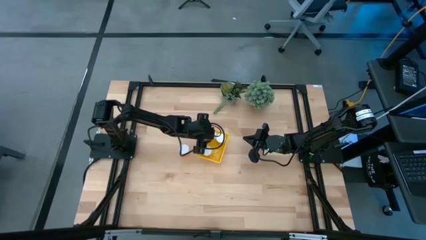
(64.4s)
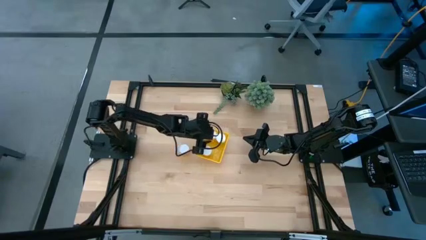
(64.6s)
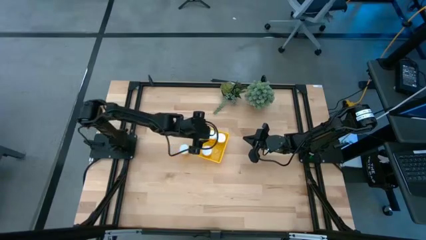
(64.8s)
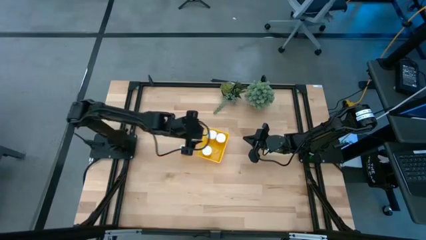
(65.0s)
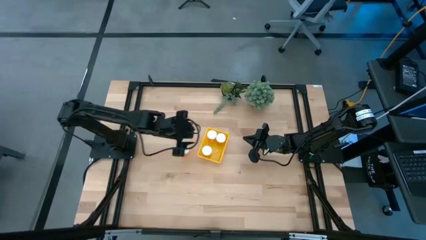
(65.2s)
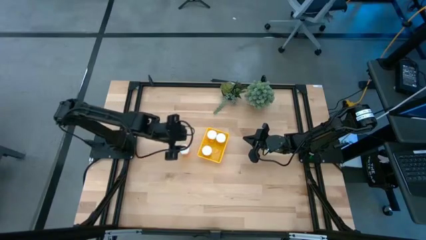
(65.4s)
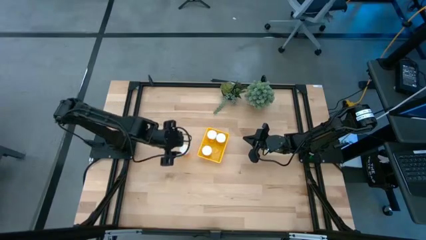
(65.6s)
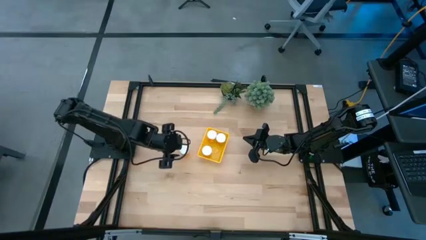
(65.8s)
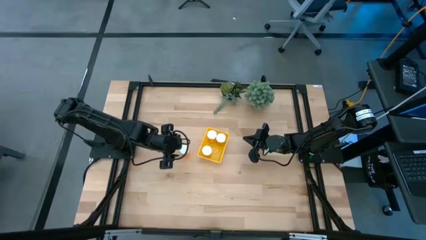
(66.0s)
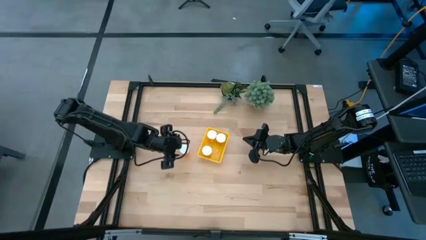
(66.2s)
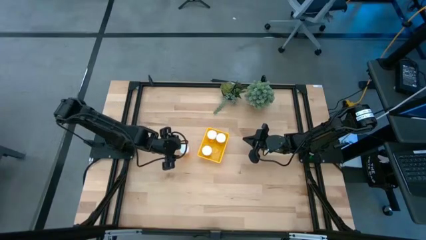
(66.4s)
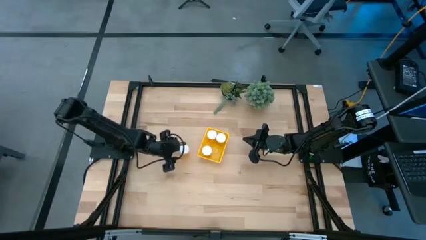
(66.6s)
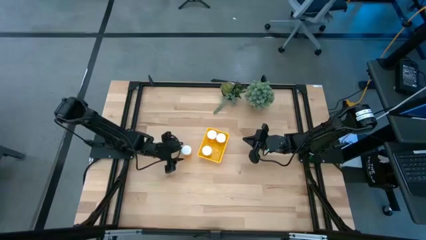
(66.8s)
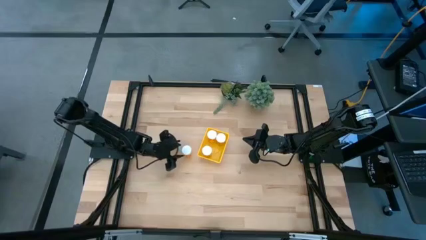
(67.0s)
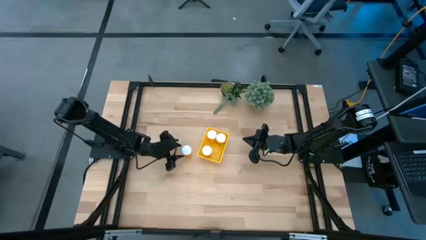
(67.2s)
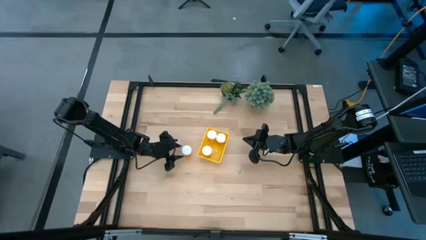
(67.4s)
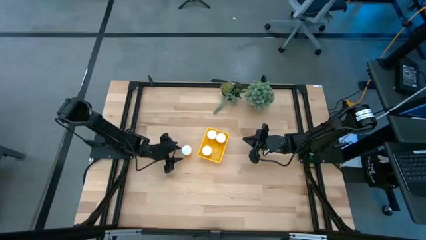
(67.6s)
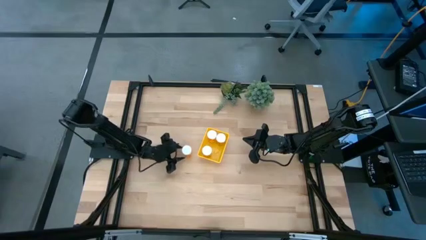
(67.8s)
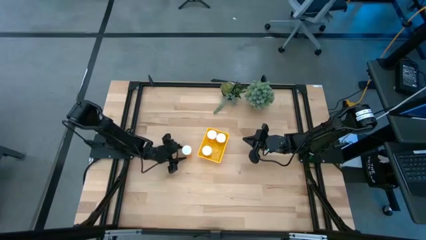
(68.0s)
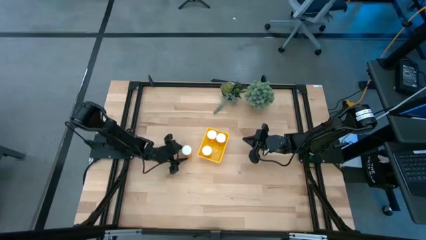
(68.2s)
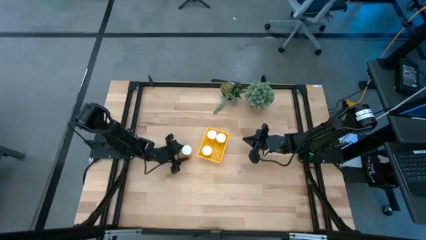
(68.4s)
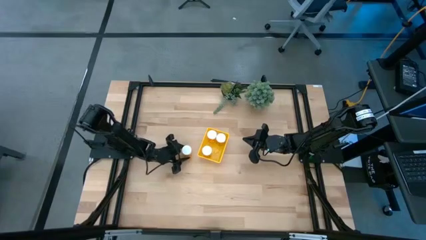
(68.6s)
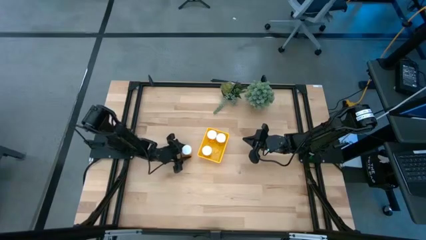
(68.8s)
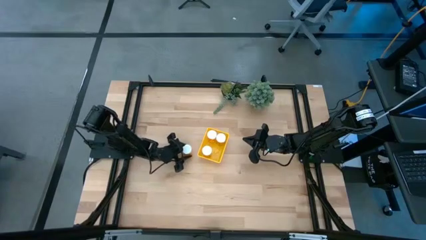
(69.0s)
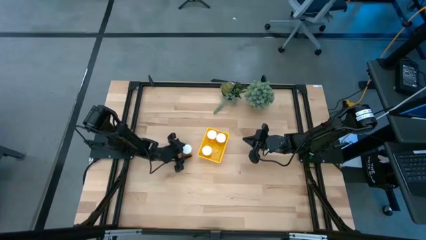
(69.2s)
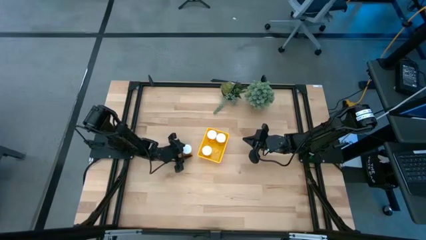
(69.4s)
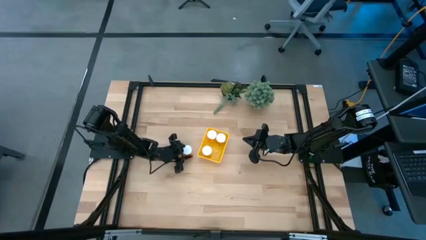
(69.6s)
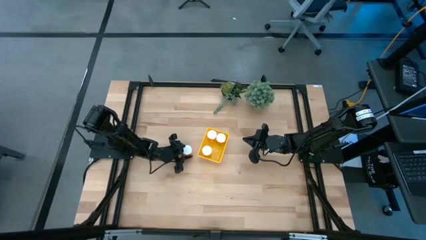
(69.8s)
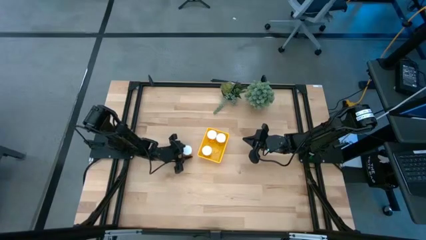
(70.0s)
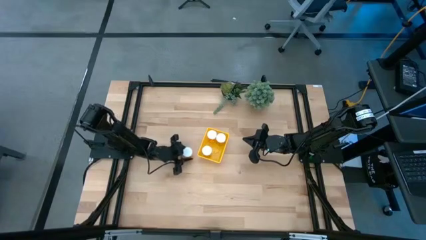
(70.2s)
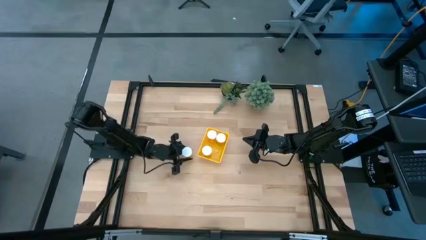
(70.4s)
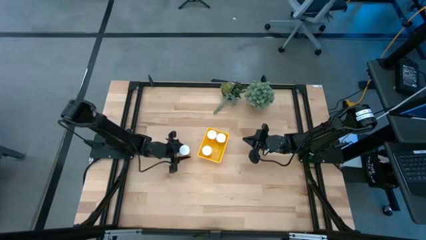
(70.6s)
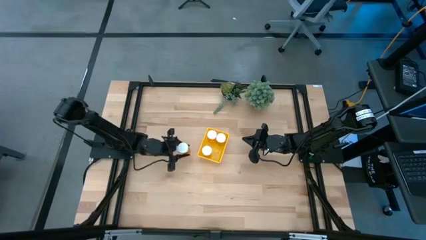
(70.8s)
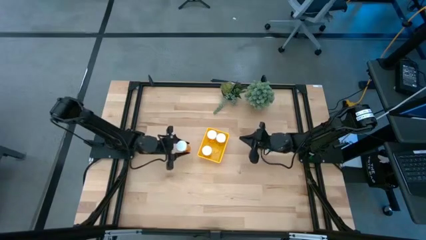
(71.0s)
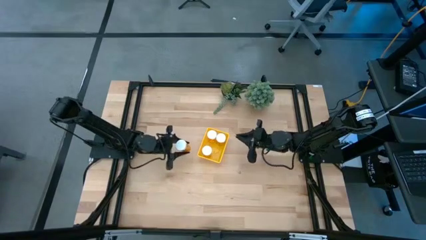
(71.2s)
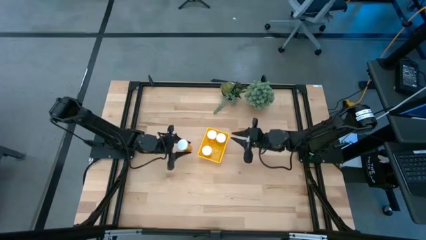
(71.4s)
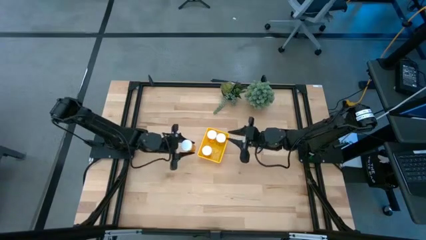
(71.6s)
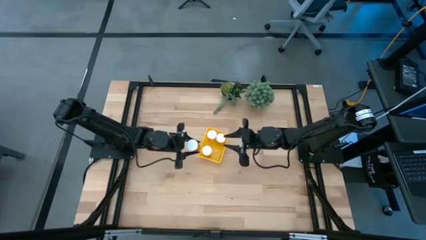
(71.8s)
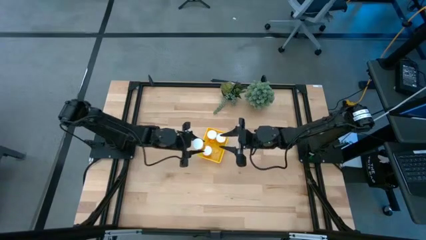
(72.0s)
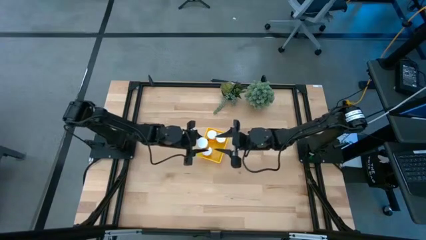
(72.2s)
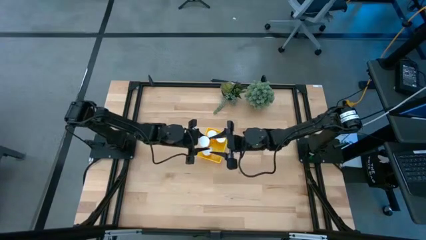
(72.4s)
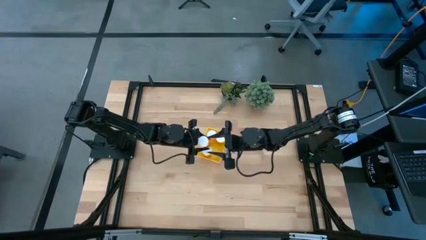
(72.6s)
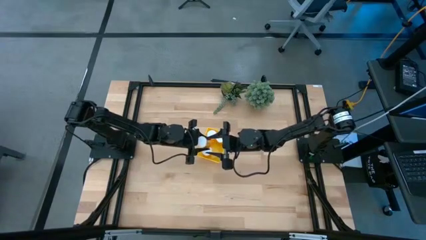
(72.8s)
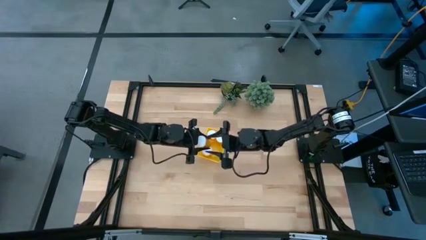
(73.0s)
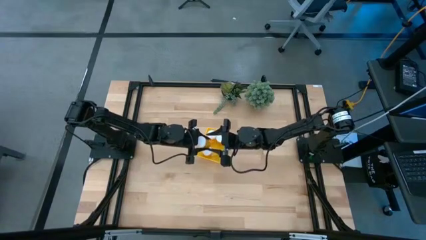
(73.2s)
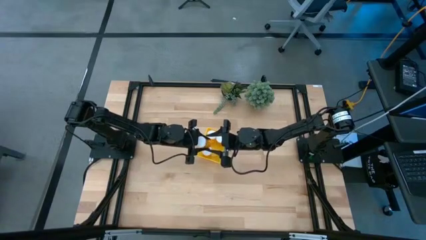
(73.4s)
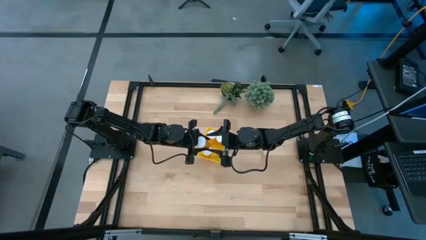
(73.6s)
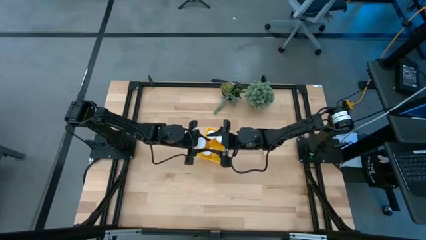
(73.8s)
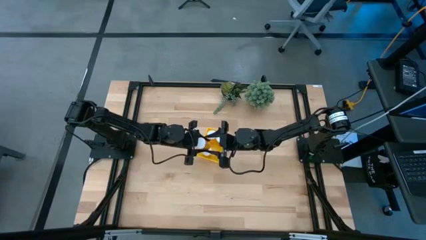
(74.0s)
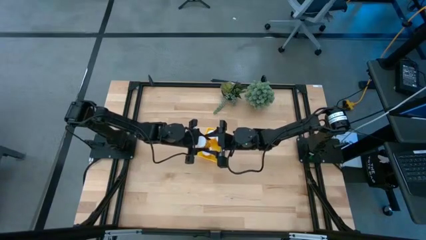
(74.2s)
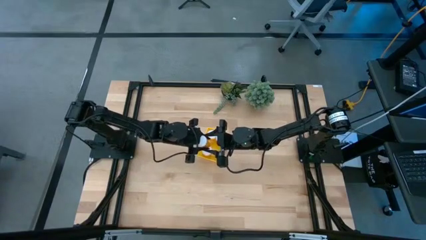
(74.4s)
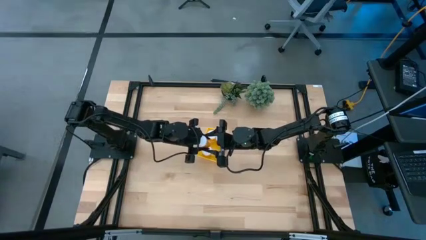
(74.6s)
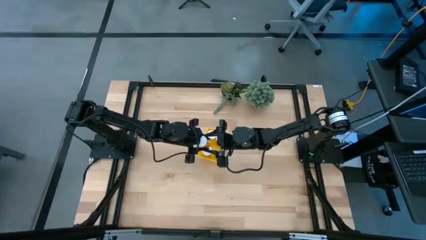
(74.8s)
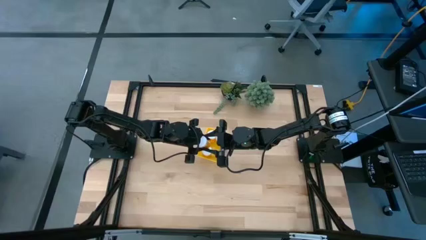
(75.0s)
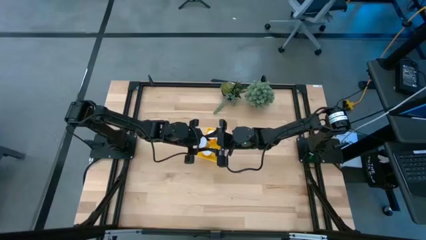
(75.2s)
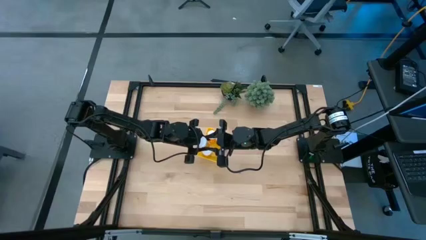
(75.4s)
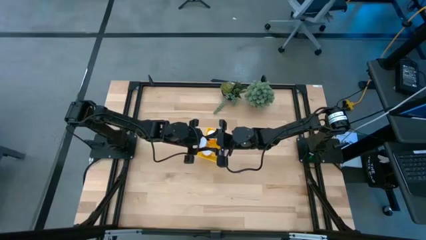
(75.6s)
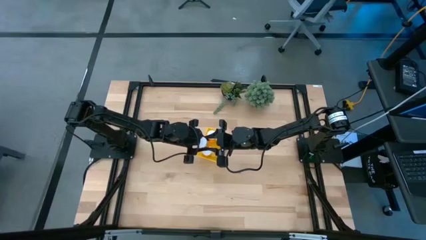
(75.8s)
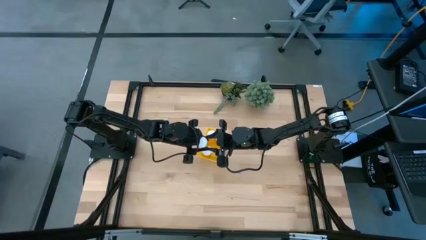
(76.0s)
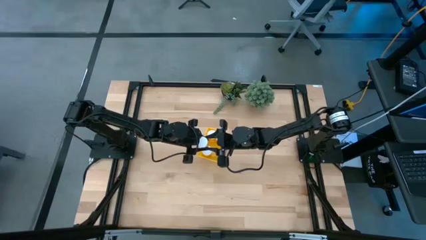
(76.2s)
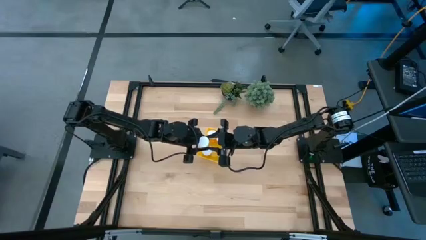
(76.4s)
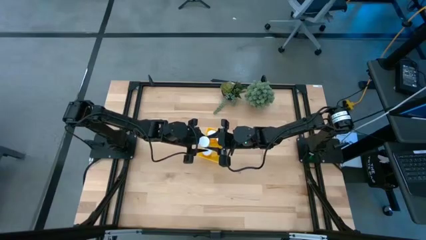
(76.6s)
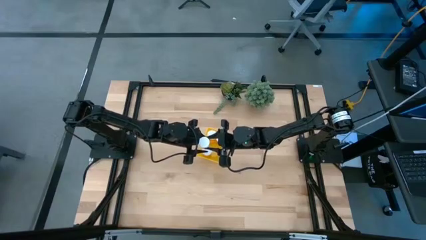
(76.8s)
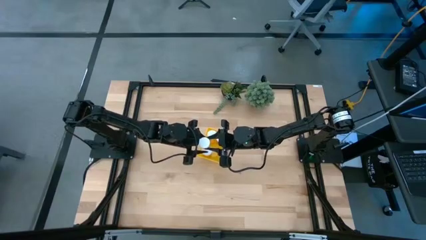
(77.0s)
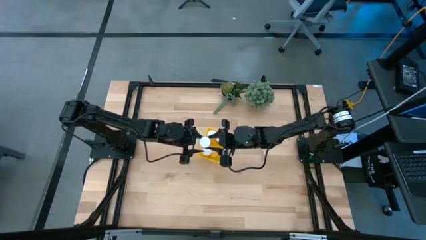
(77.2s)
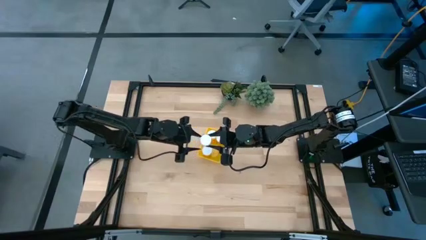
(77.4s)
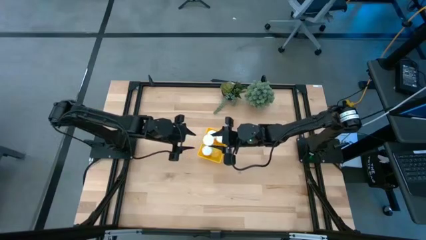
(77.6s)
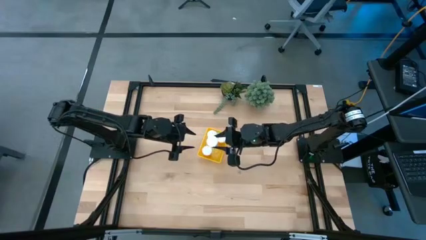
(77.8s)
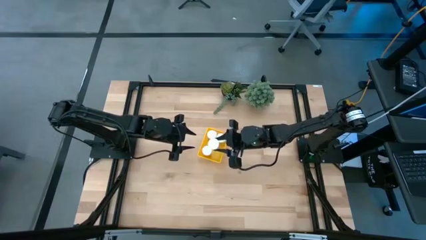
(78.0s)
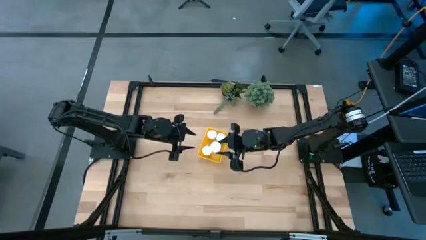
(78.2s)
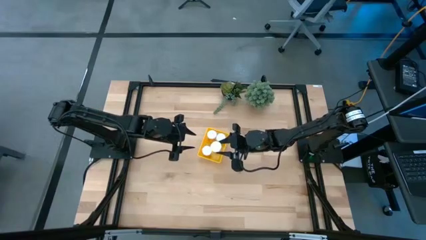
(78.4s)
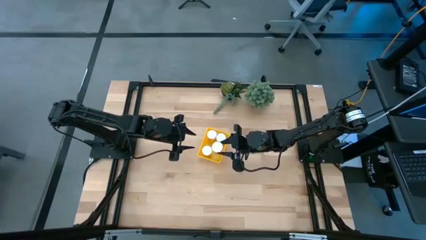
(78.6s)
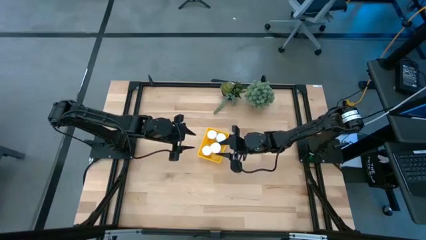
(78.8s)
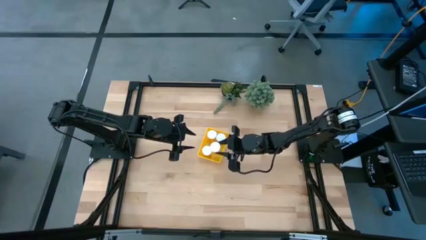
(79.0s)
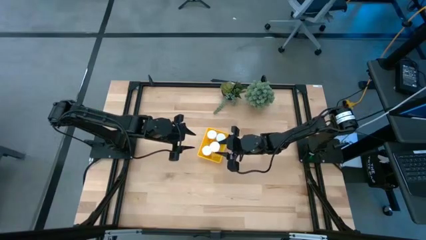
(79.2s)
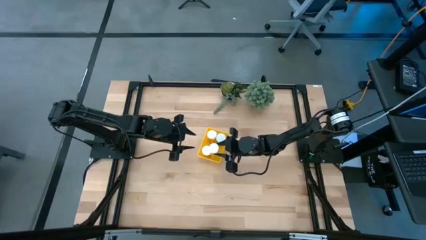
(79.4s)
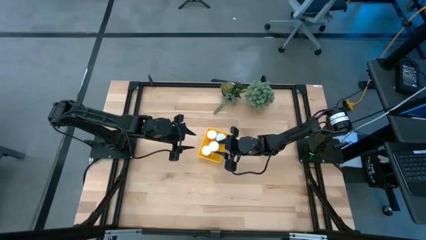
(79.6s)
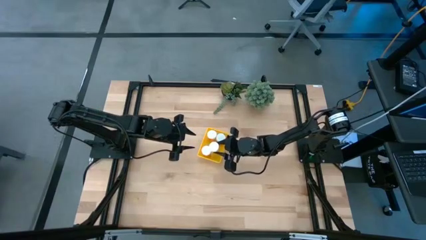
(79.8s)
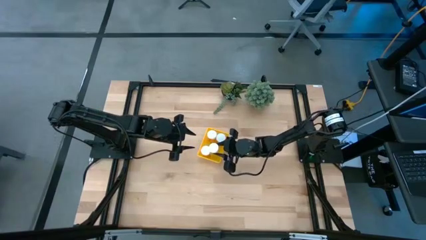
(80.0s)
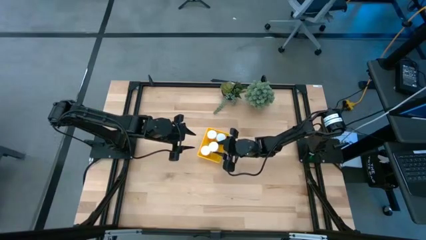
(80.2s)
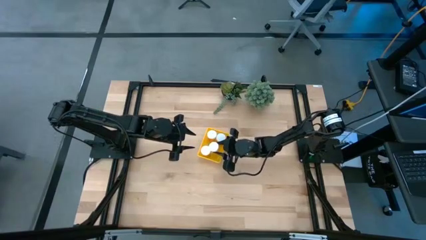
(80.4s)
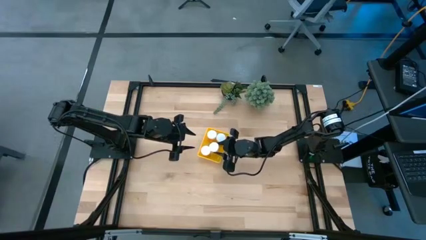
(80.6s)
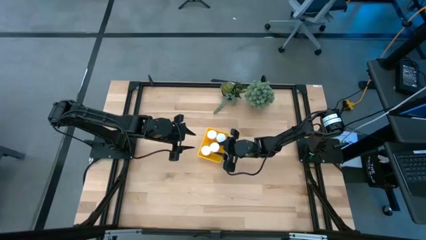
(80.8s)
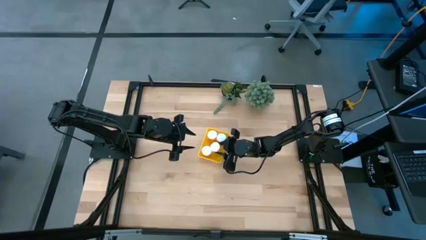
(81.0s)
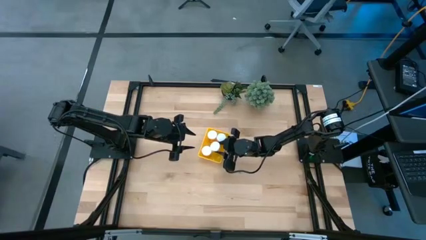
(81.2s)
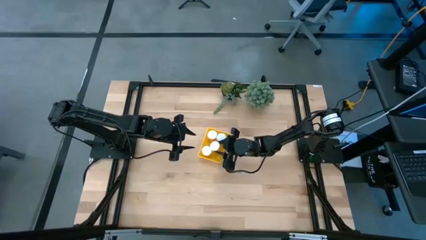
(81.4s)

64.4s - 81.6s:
Task: Pick and place pill bottles into a basket
Put the orange pill bottle into the yellow bin
